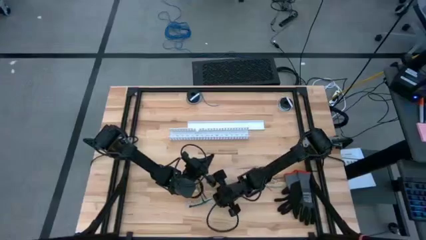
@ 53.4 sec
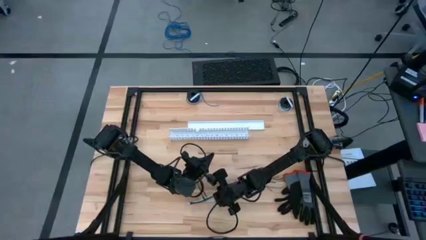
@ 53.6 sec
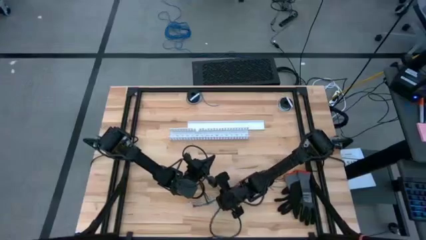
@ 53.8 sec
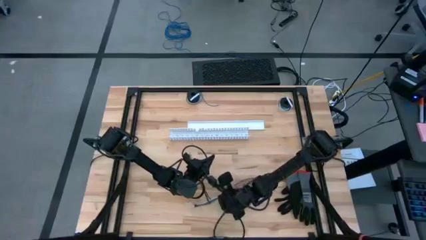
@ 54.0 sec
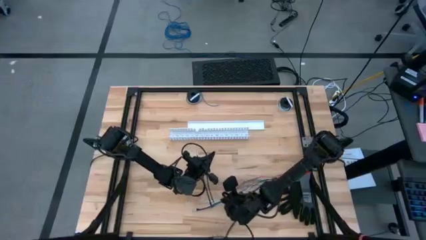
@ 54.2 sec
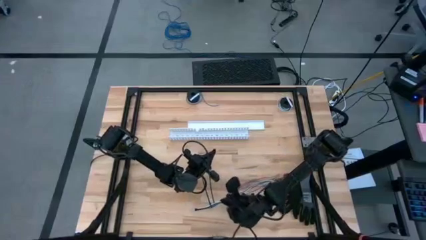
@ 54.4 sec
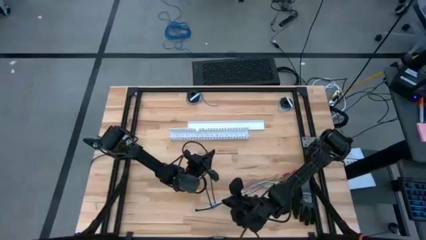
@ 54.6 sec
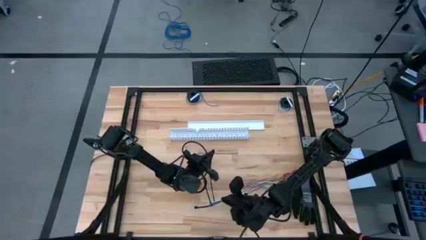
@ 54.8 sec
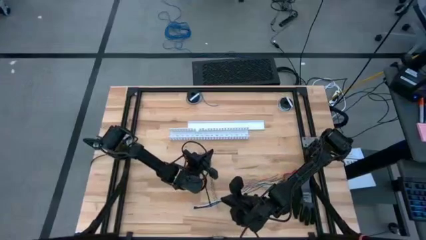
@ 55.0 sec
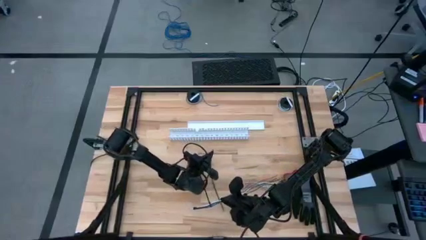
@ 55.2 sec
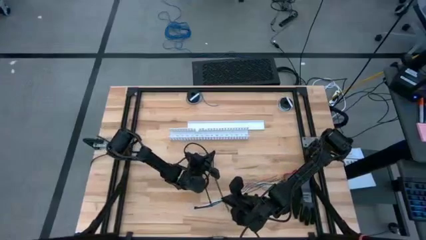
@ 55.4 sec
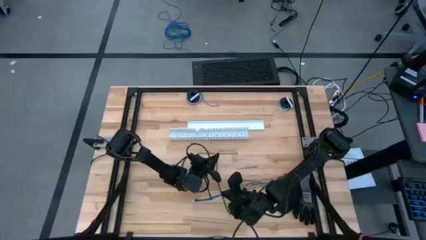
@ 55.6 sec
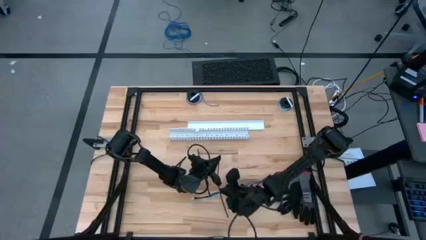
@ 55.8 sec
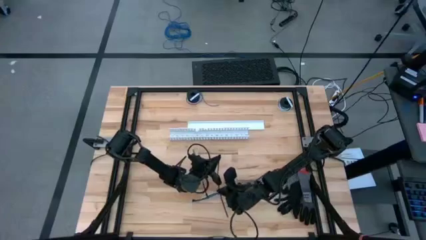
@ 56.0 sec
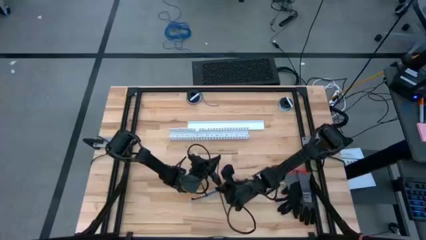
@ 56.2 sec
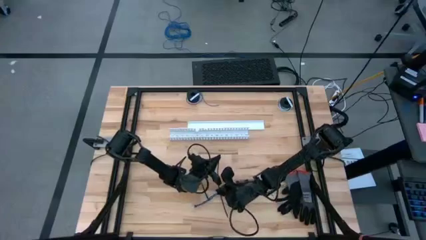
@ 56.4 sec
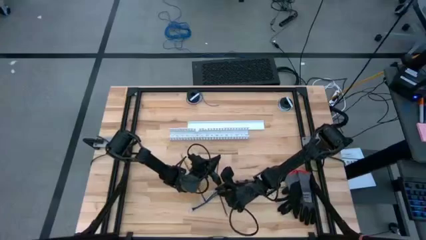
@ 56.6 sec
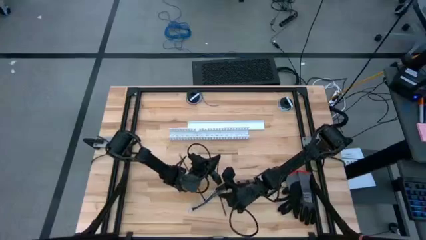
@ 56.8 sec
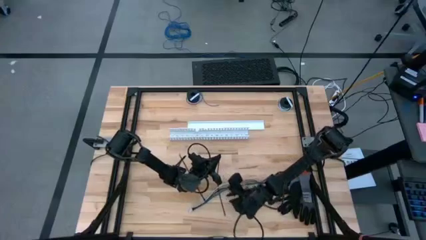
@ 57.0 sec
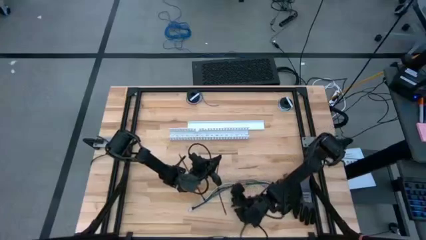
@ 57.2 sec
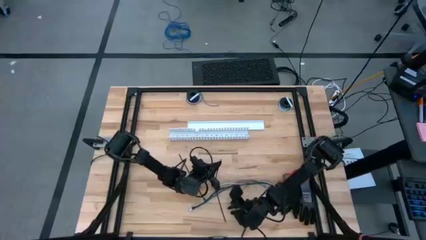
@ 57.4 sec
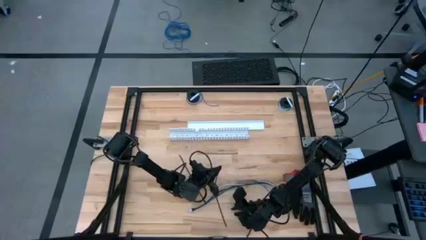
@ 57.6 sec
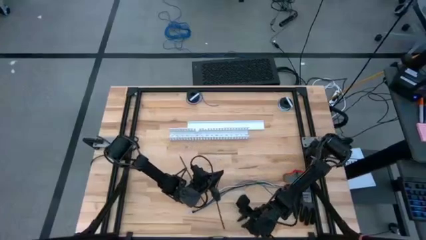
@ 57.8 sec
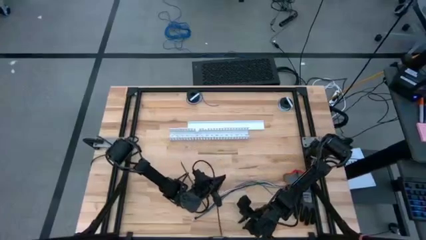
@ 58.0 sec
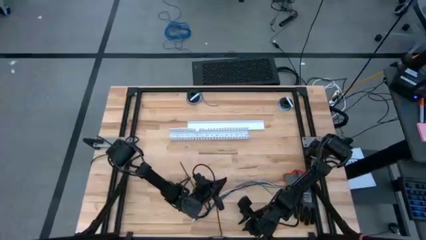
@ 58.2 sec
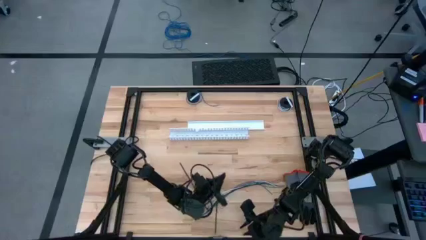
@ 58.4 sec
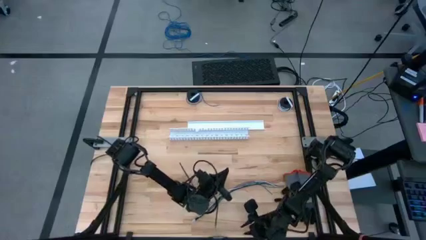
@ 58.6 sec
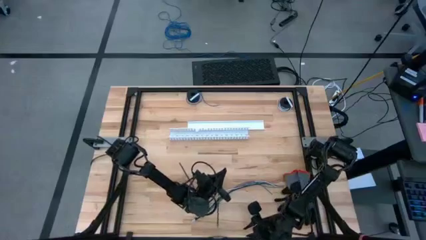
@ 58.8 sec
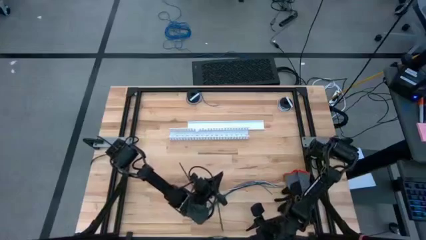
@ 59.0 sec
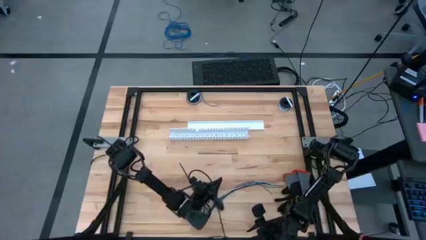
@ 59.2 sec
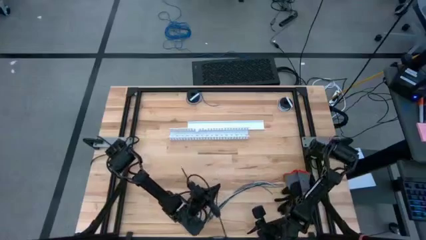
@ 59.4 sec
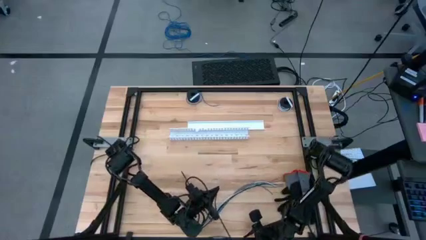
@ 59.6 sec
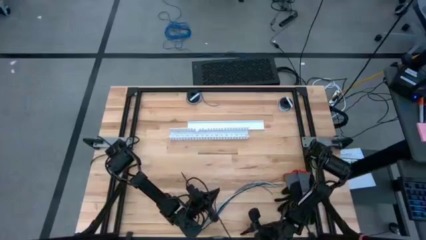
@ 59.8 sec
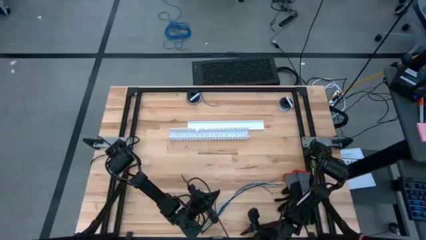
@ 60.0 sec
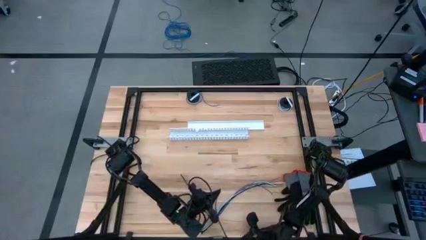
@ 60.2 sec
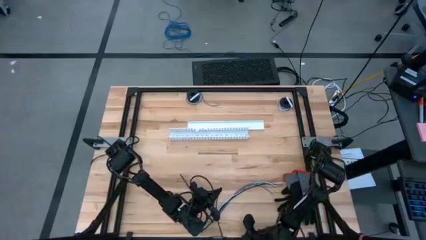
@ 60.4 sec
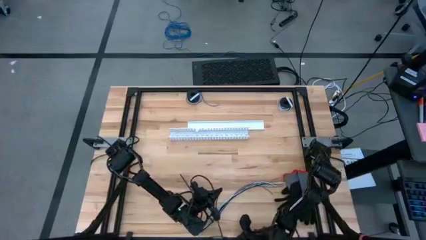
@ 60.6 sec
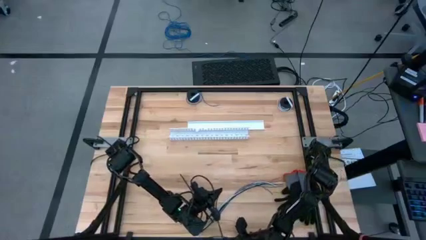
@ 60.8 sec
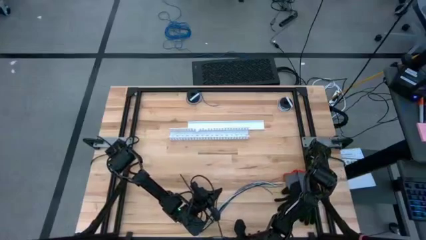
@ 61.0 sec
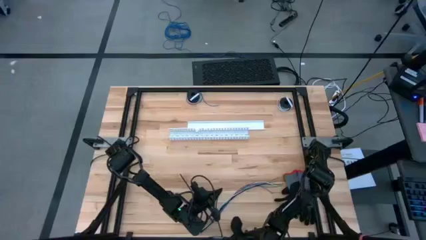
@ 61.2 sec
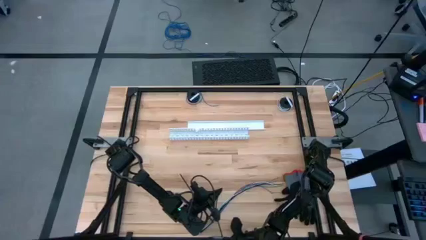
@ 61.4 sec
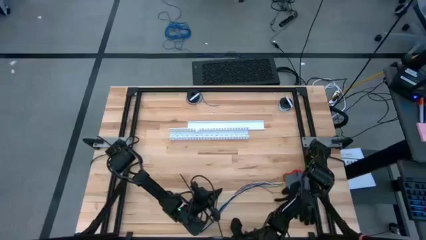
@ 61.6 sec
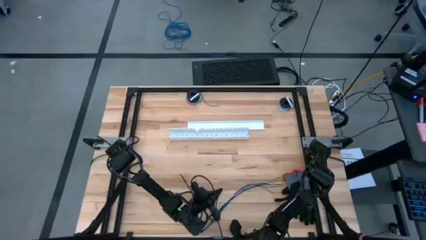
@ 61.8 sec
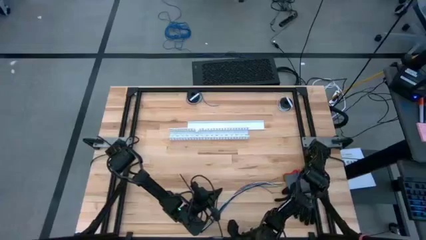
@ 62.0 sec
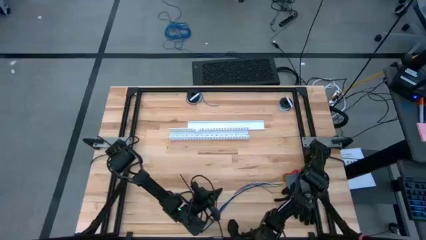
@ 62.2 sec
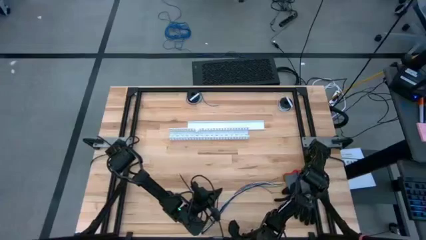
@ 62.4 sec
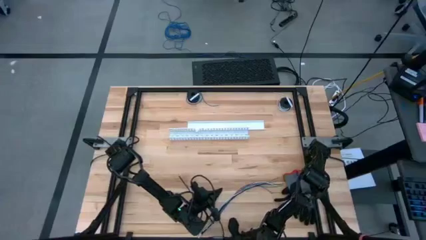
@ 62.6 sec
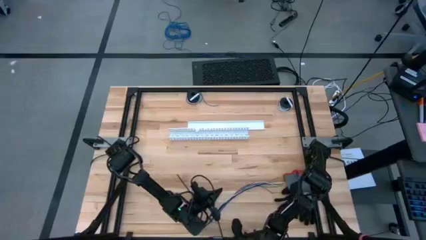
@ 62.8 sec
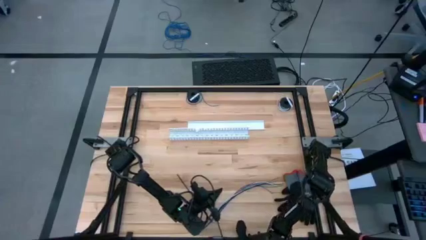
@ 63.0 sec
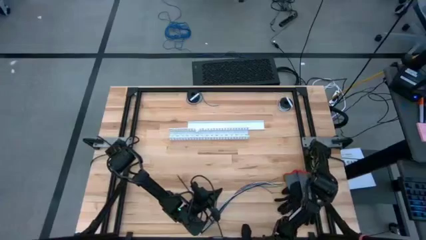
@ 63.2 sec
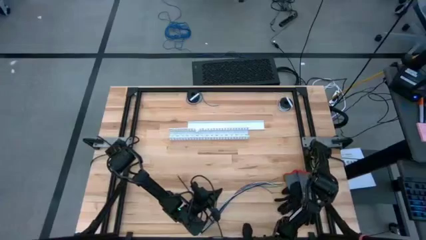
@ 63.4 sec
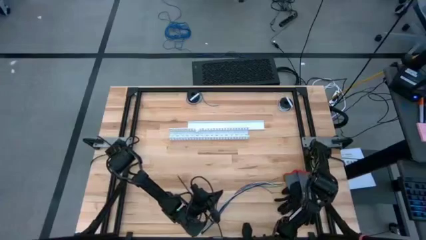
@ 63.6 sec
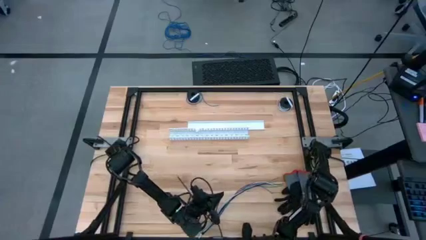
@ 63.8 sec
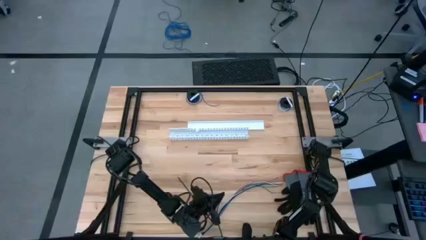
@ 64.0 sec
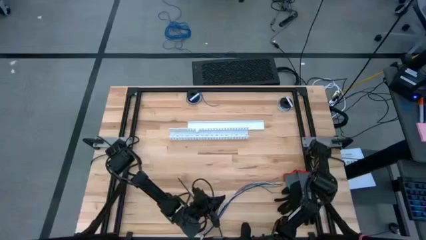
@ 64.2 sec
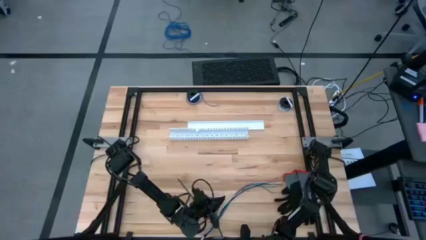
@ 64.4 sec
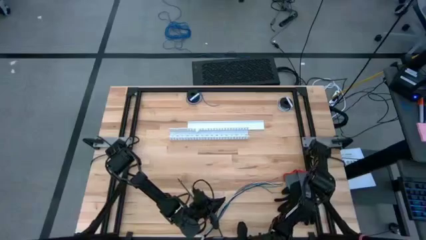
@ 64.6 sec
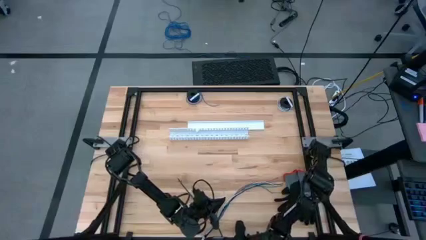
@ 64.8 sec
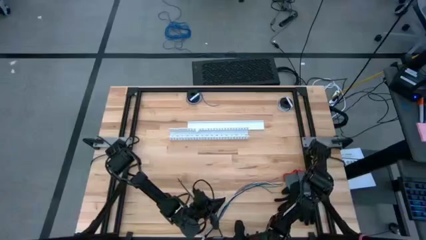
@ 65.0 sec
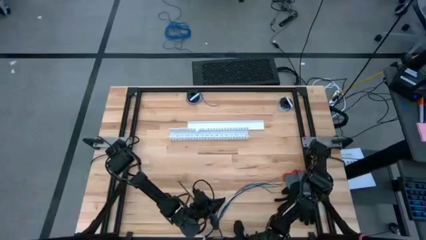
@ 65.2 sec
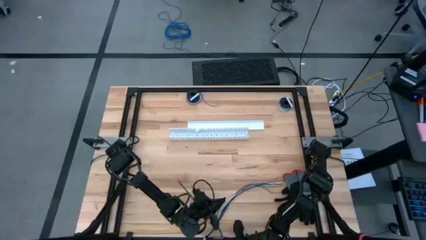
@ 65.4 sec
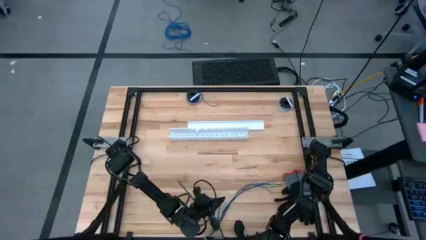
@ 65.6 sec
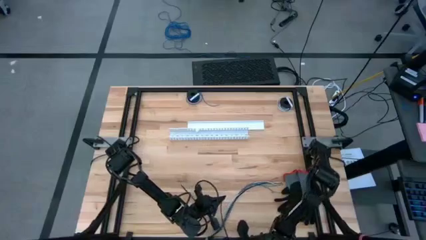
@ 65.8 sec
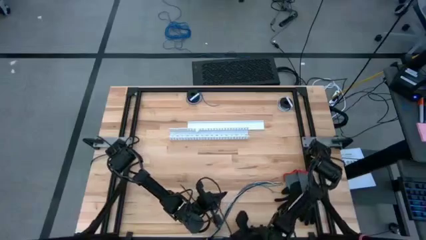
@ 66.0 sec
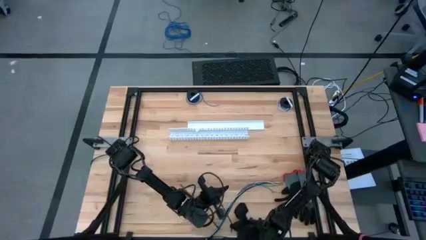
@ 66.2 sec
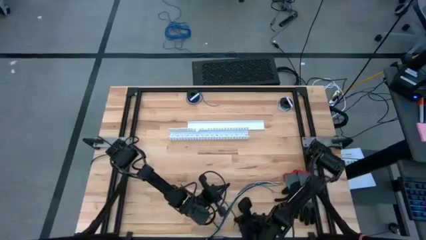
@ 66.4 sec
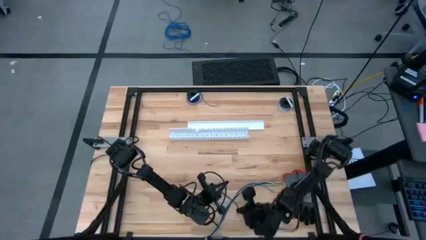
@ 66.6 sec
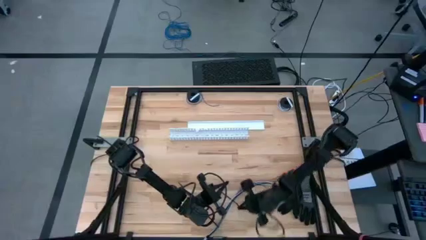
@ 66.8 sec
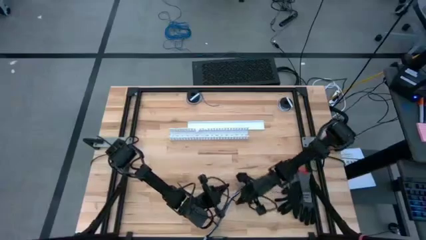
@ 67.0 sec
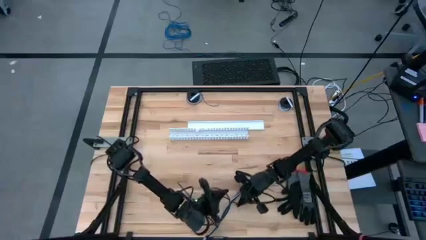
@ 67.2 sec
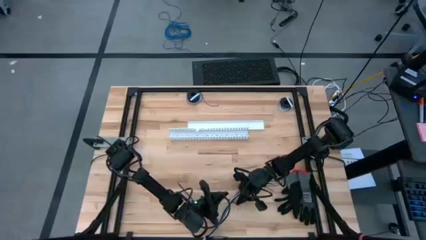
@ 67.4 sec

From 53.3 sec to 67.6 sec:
Task: Ziptie cables
Assemble the cable wires with the second cable zip tie
